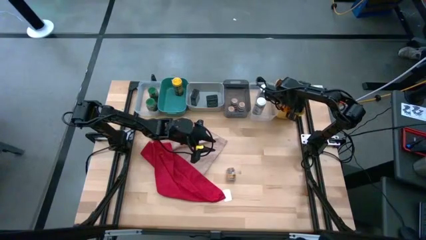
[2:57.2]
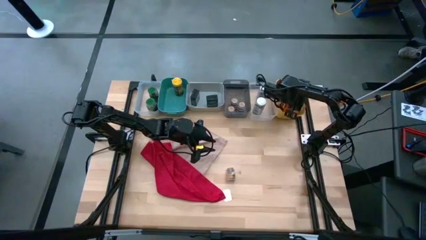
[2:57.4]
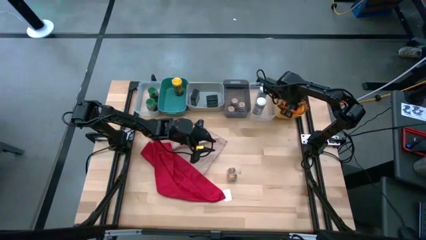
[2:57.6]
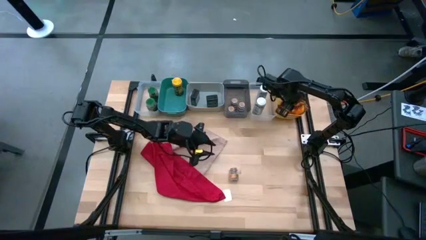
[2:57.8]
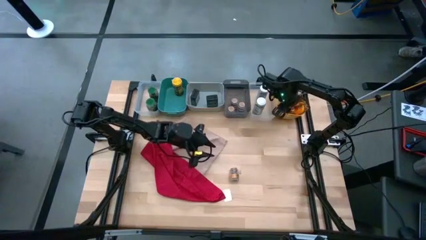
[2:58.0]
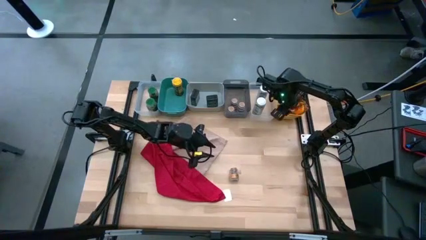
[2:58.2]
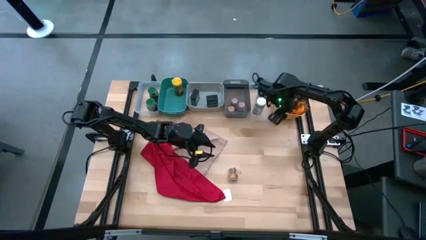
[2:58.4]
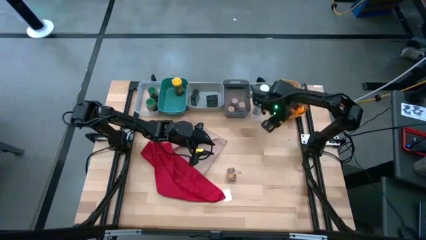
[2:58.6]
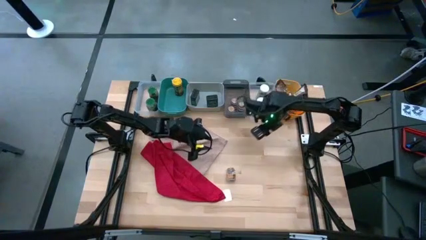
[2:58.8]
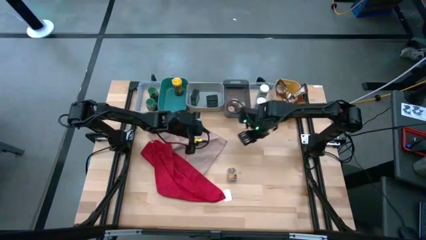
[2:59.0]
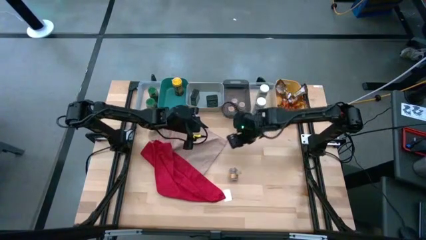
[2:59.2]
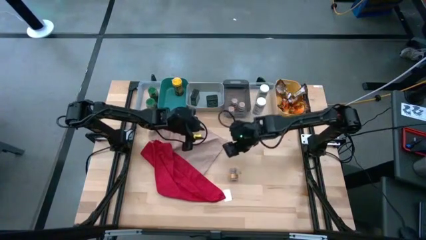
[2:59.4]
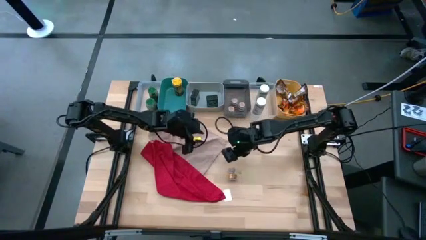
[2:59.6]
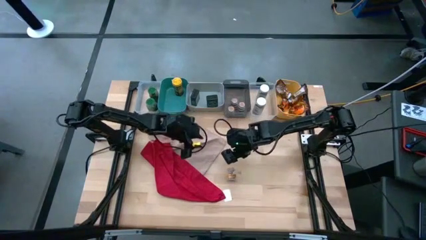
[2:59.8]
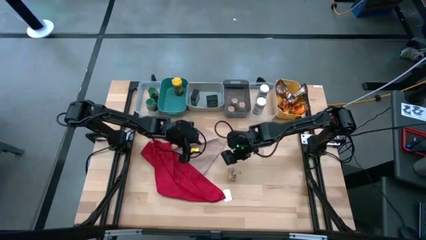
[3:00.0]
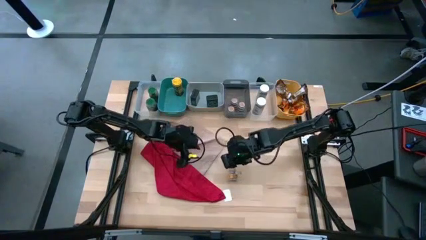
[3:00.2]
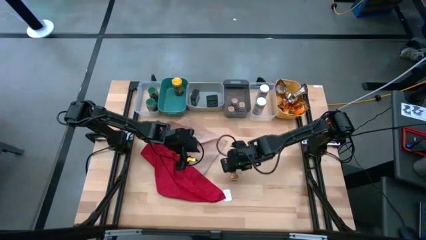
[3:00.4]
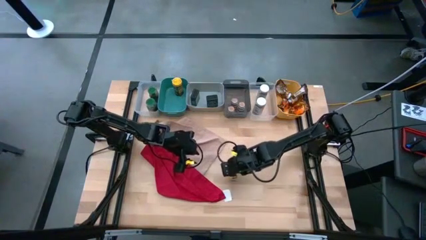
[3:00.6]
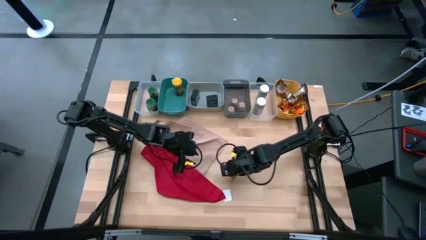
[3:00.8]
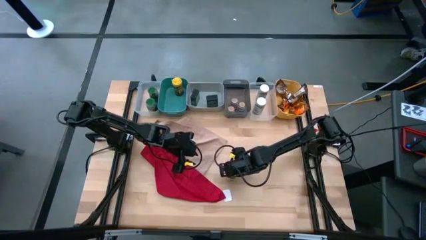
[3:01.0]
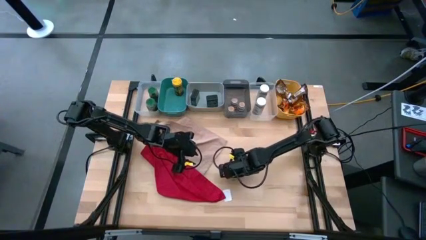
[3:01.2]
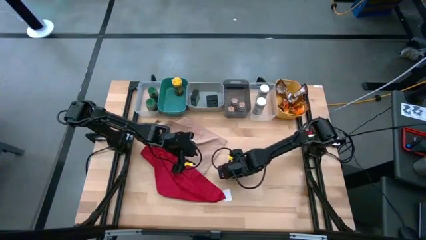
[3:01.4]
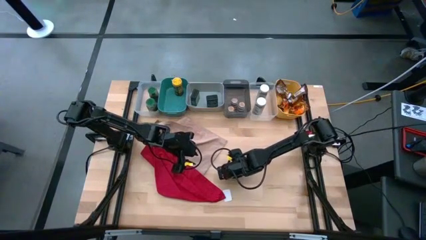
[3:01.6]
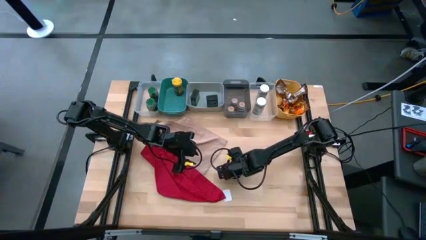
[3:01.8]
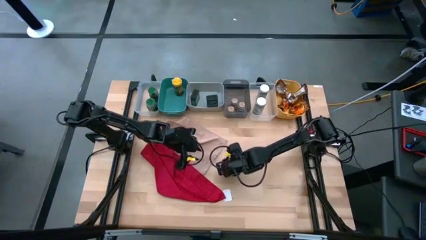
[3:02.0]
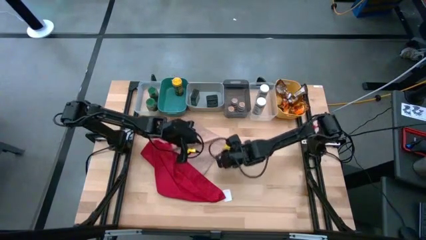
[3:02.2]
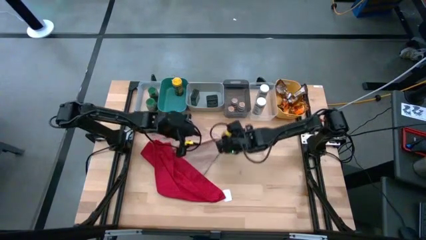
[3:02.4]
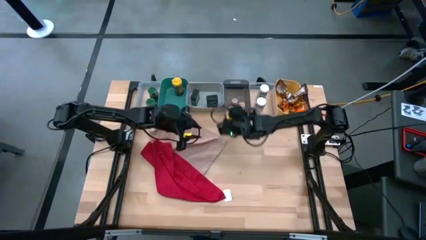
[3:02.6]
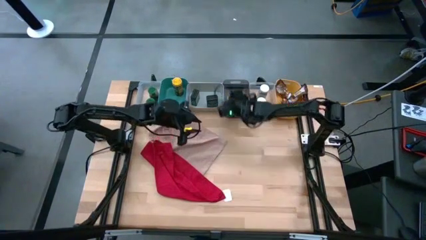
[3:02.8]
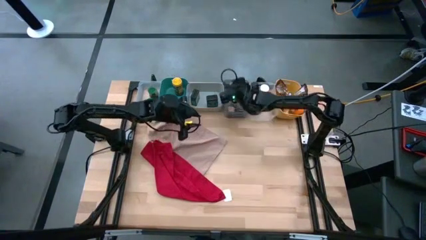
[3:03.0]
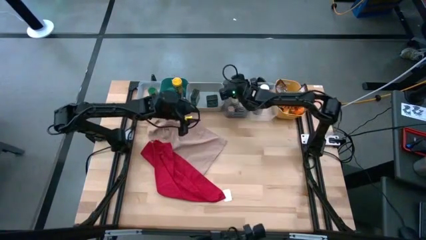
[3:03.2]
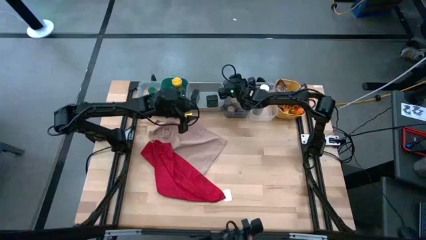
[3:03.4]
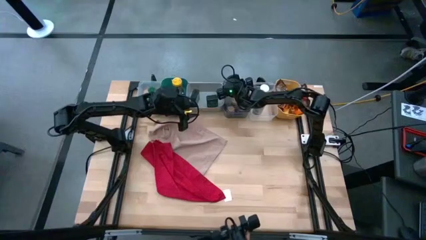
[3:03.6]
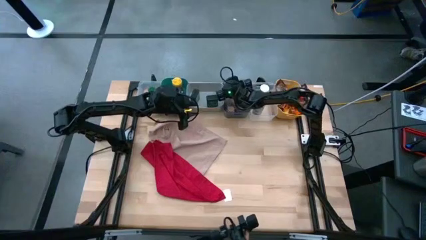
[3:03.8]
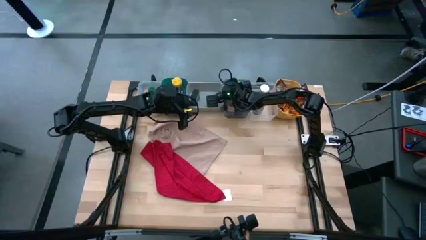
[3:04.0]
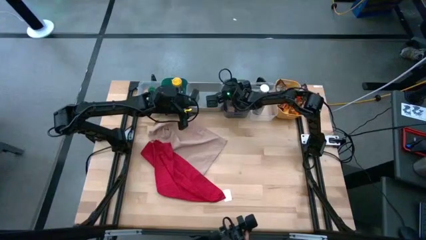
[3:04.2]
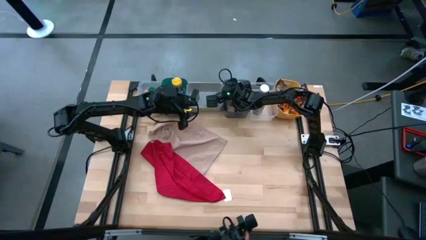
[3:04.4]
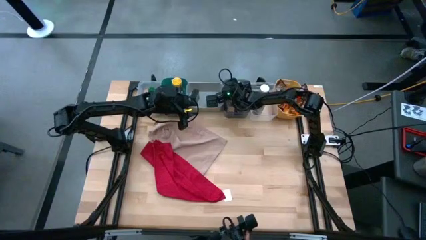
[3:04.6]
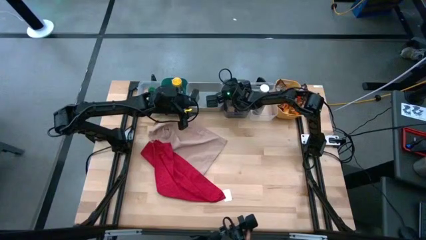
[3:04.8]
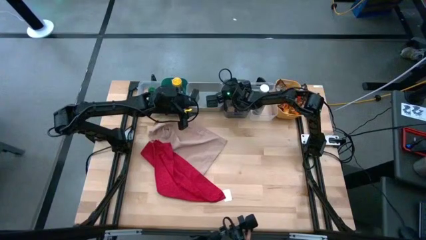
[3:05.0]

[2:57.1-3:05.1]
Task: Sort spices by type
Put the brown seasoning bottle into the black bin

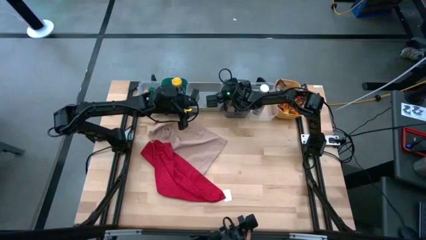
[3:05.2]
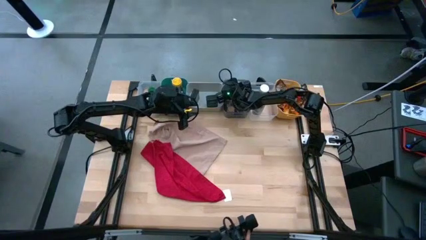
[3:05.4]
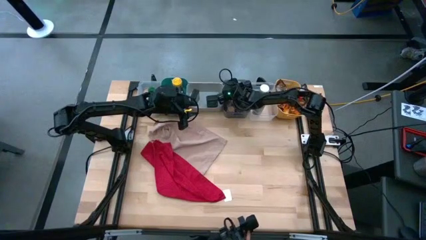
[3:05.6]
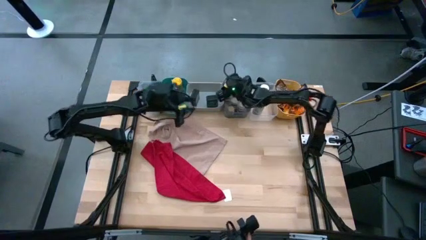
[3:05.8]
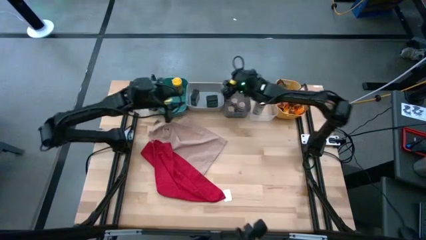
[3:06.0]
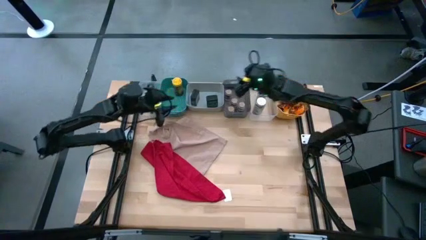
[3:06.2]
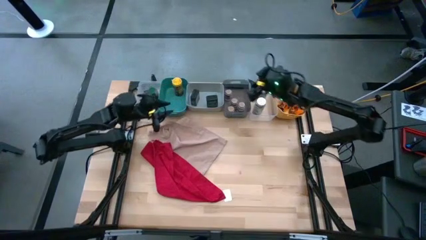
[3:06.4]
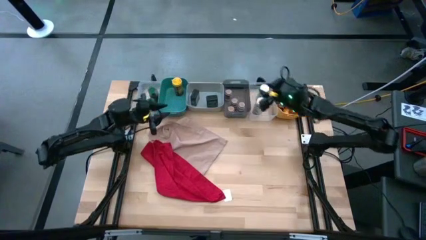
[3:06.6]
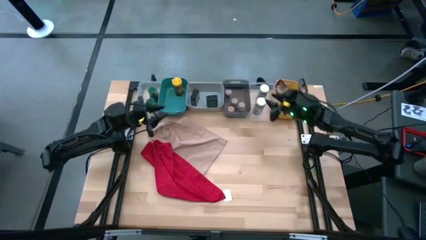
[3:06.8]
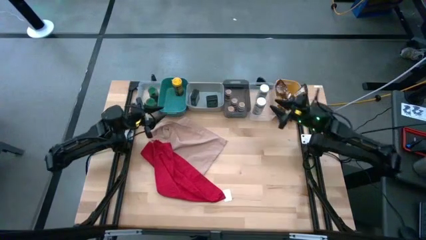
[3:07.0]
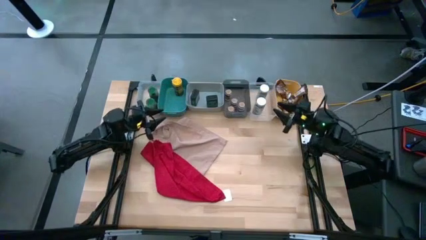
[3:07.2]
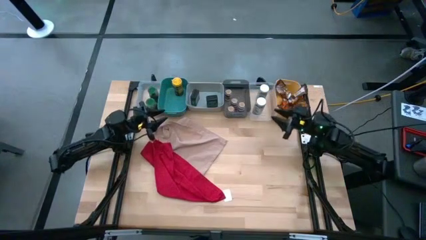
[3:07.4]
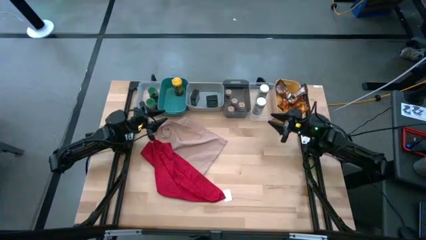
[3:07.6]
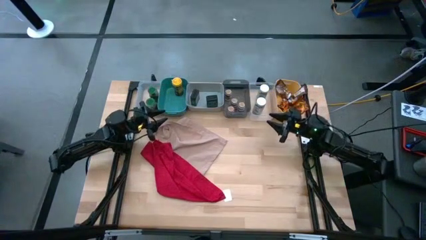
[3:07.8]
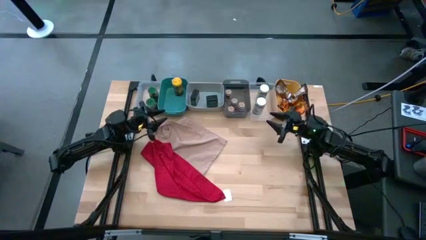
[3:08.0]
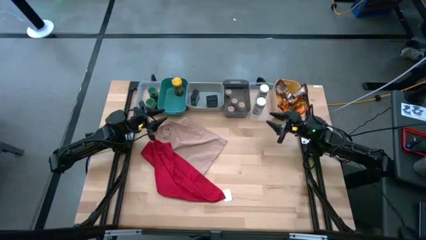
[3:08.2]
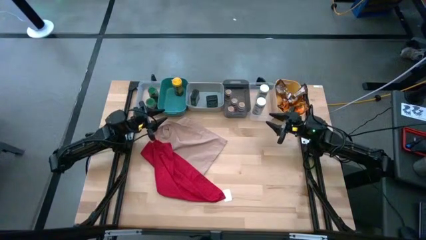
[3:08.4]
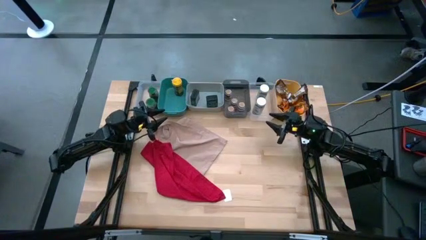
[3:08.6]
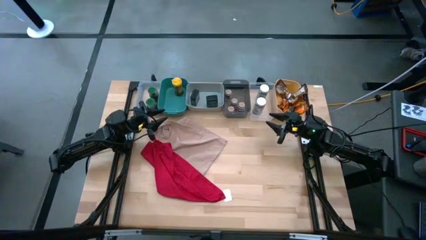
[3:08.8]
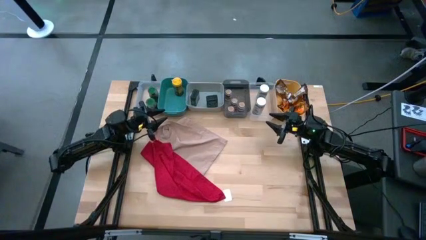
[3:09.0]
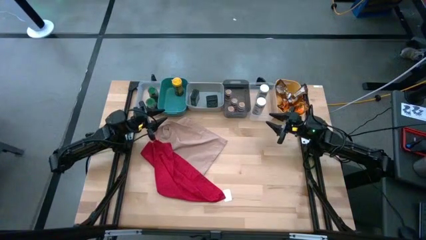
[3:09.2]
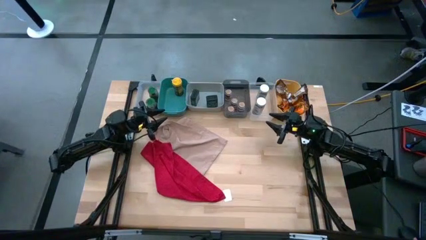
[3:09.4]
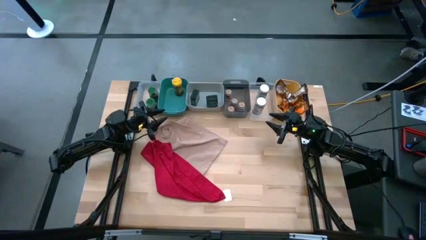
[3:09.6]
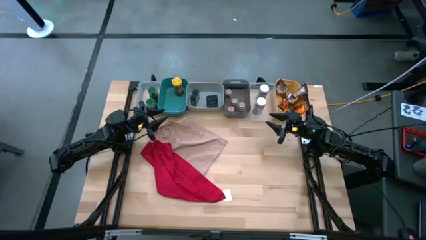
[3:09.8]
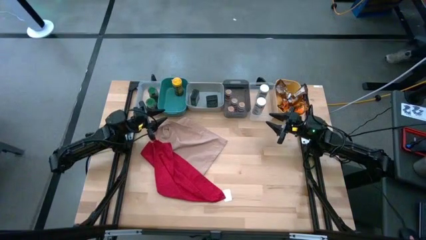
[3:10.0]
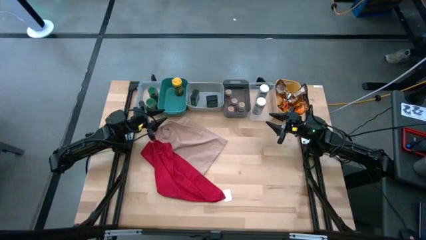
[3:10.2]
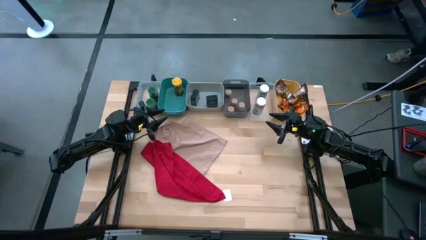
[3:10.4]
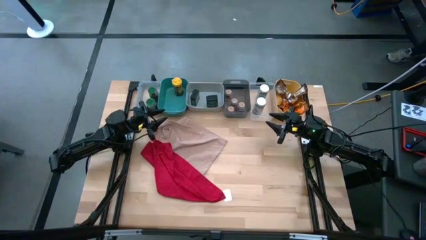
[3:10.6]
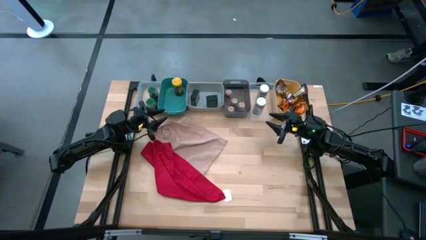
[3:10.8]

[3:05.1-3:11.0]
Return to Home Position

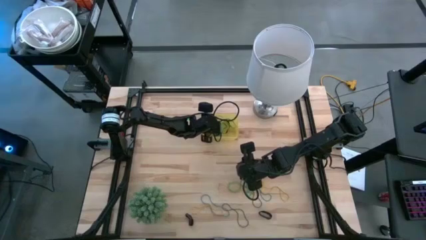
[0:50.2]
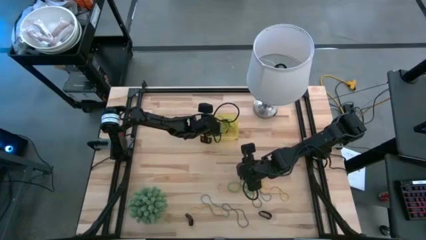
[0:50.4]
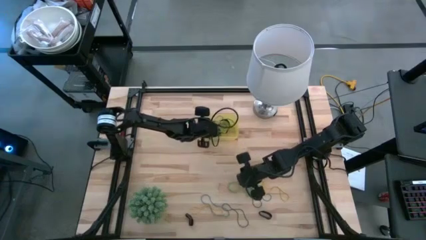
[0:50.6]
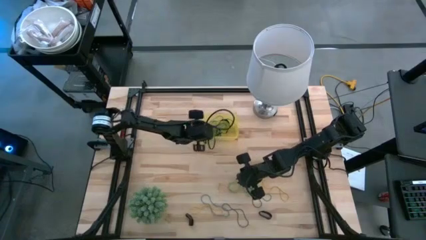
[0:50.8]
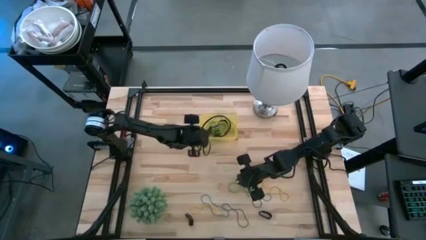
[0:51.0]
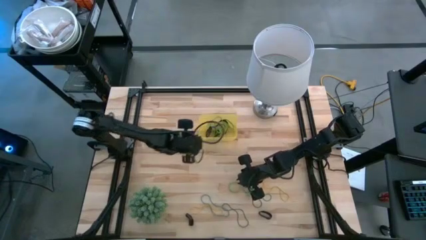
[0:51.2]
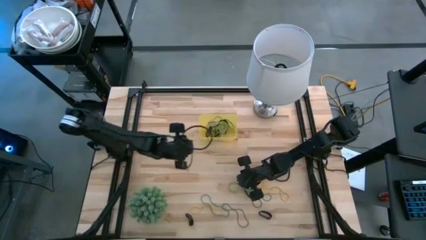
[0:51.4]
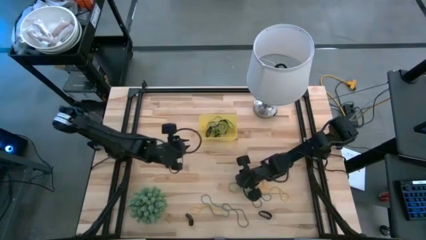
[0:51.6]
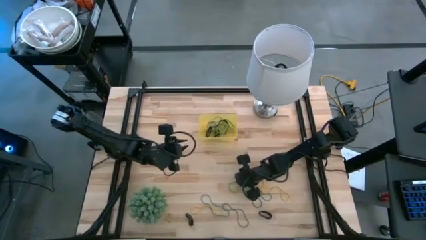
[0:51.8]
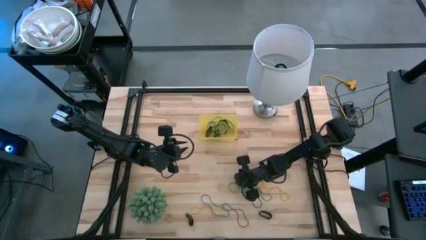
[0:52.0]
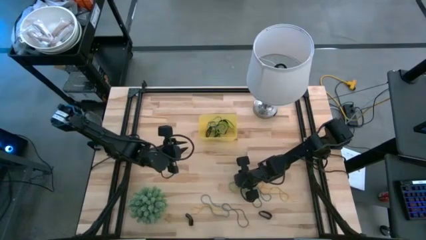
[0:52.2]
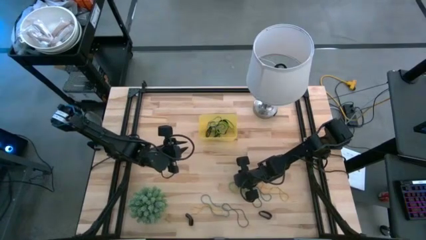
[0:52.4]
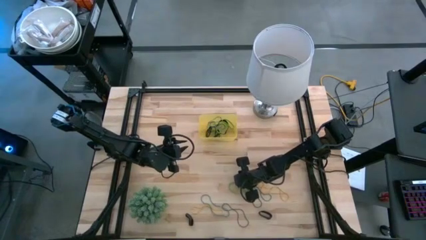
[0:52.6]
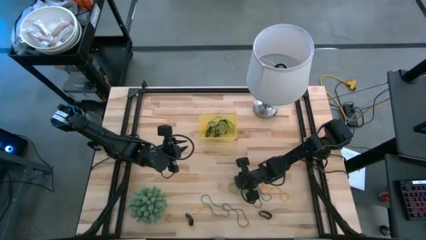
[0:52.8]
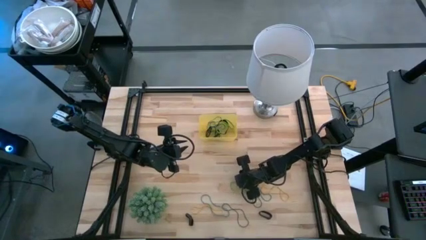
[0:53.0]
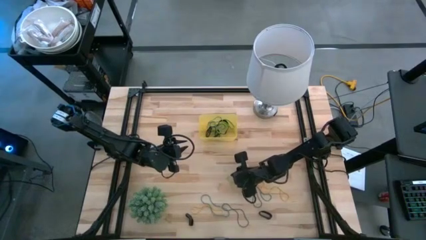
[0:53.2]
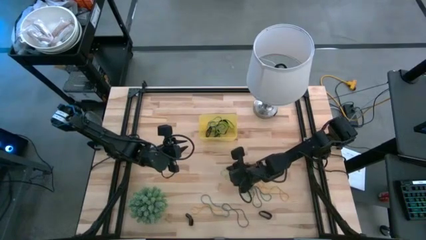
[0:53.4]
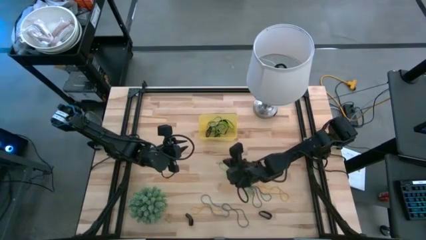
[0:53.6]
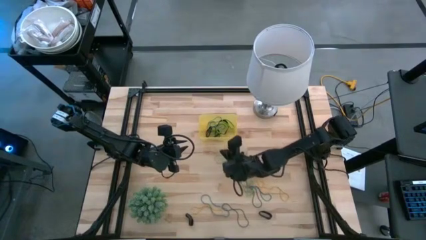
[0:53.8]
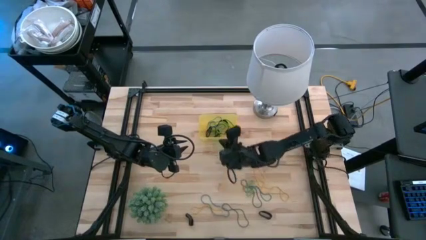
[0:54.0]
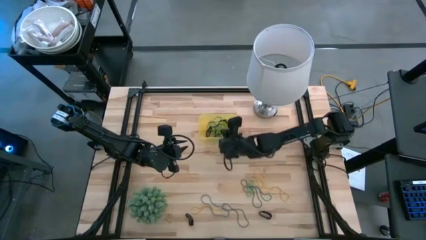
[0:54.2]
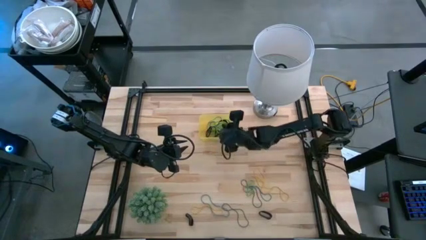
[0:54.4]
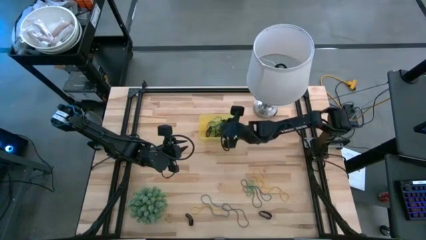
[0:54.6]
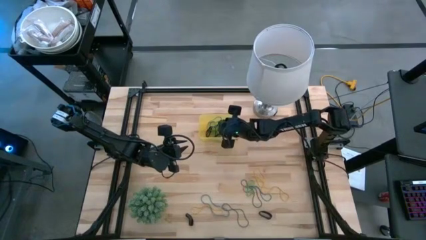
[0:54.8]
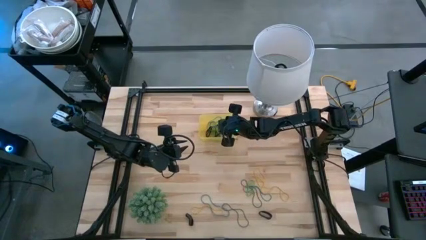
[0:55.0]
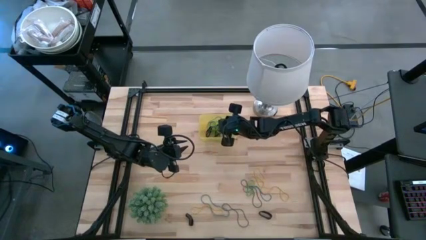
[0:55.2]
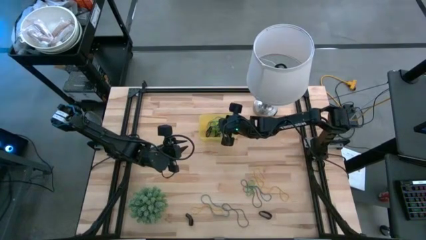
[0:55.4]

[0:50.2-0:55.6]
Task: Pick and place rubber bands into bin
Put the green rubber band into the yellow bin
